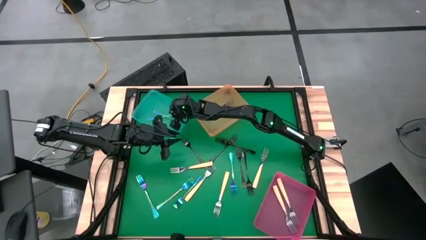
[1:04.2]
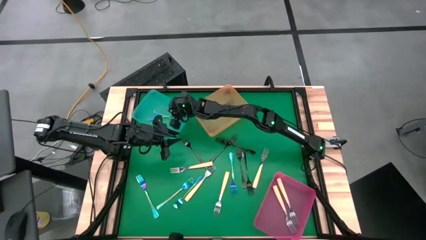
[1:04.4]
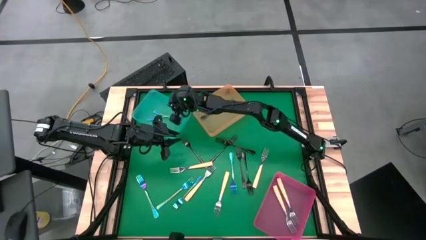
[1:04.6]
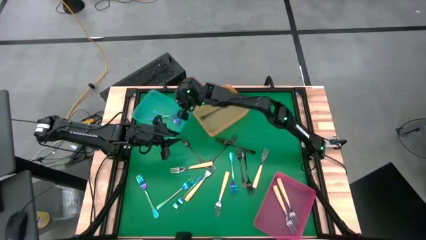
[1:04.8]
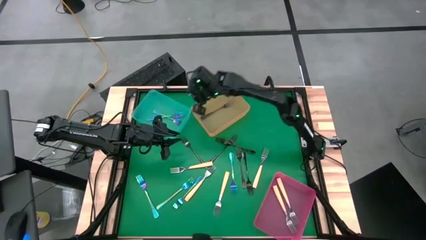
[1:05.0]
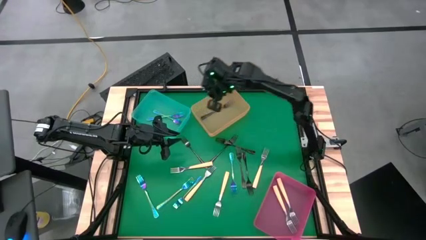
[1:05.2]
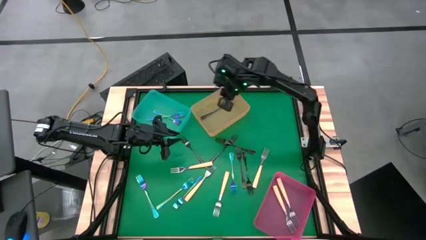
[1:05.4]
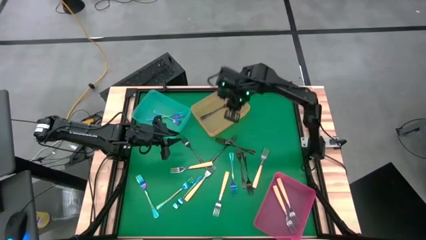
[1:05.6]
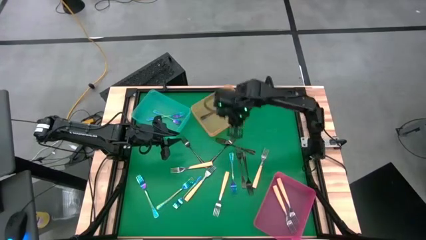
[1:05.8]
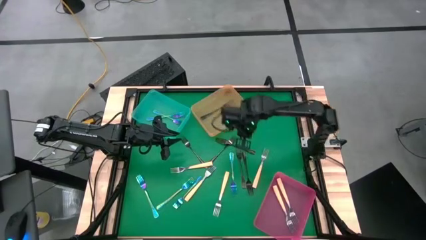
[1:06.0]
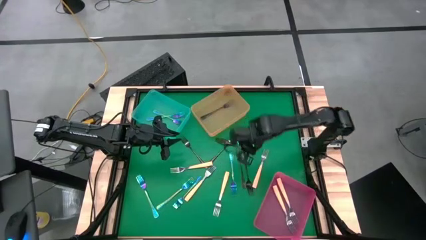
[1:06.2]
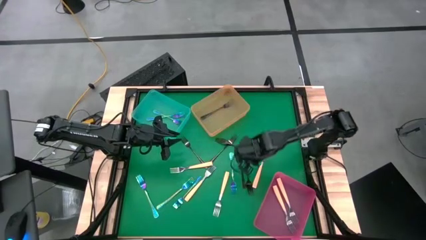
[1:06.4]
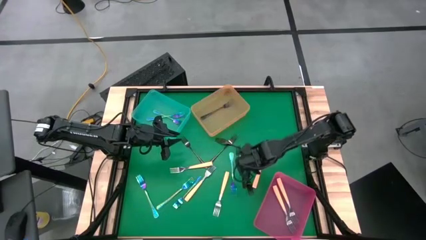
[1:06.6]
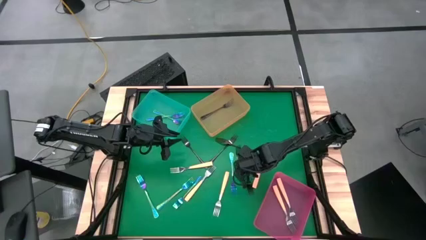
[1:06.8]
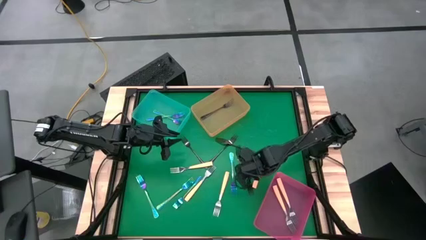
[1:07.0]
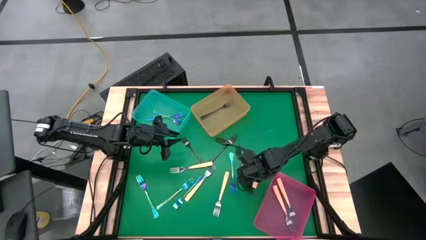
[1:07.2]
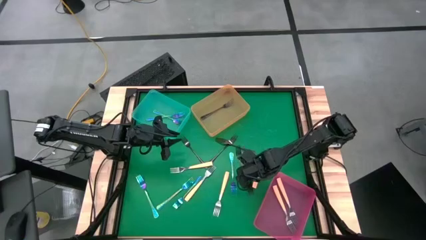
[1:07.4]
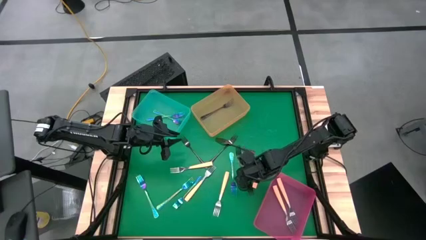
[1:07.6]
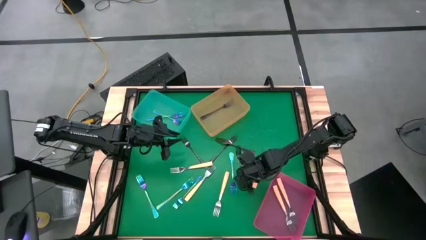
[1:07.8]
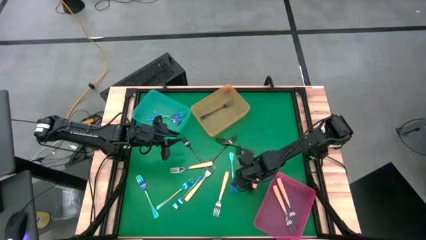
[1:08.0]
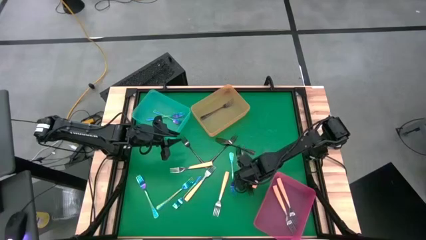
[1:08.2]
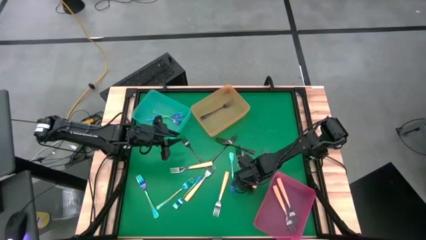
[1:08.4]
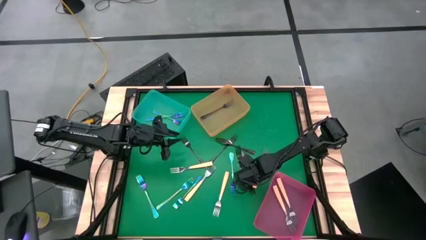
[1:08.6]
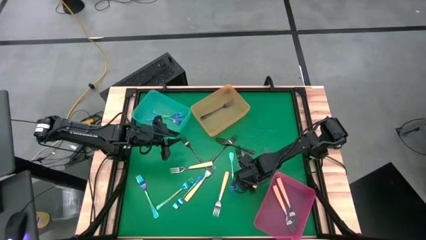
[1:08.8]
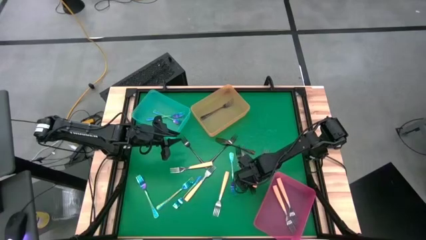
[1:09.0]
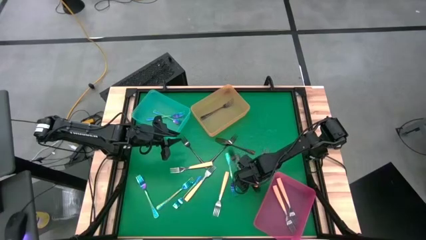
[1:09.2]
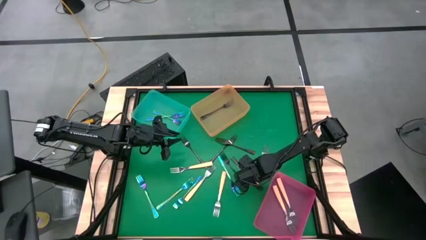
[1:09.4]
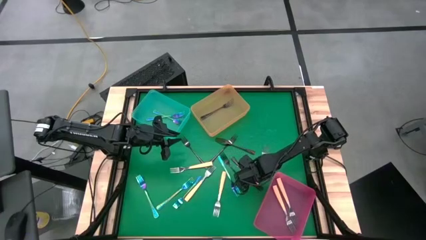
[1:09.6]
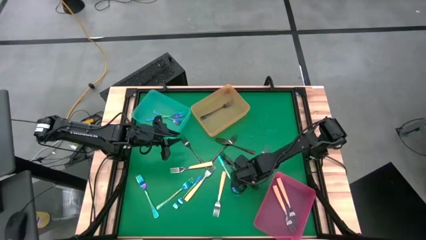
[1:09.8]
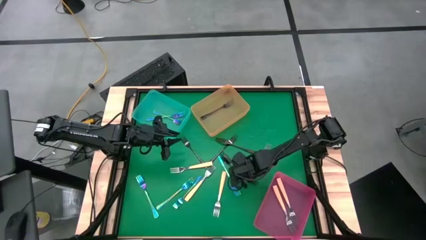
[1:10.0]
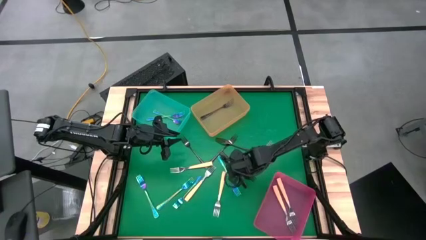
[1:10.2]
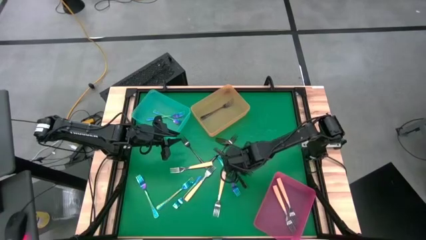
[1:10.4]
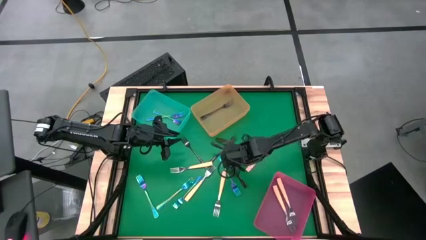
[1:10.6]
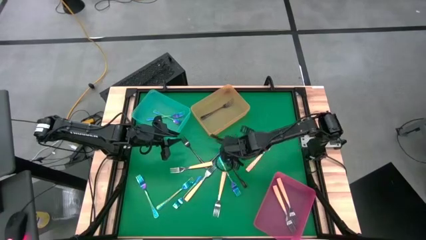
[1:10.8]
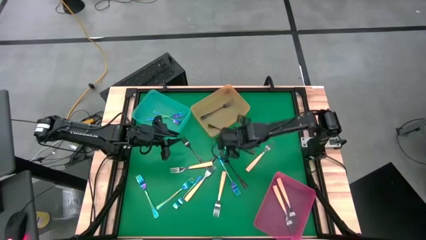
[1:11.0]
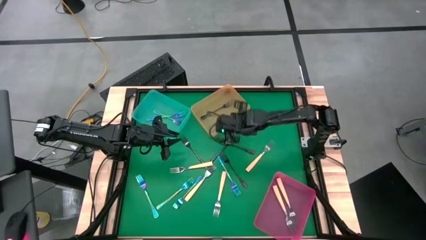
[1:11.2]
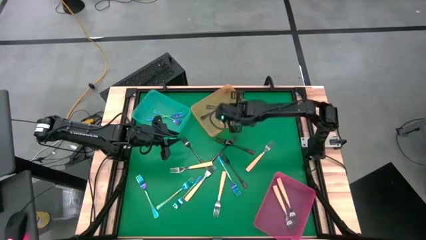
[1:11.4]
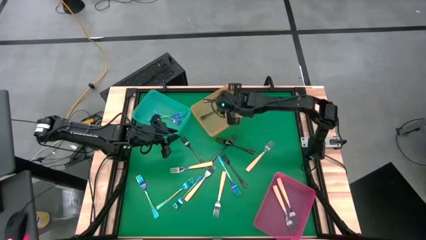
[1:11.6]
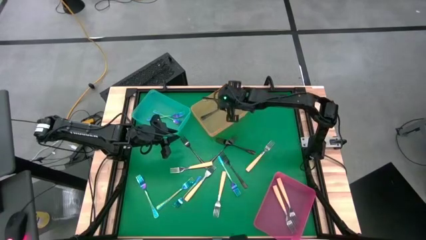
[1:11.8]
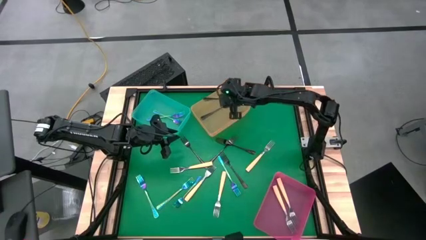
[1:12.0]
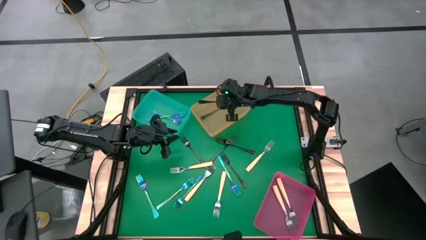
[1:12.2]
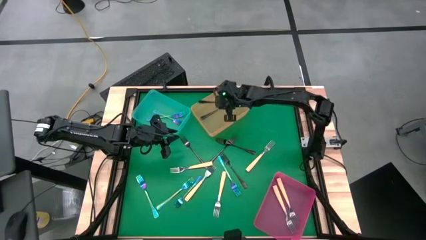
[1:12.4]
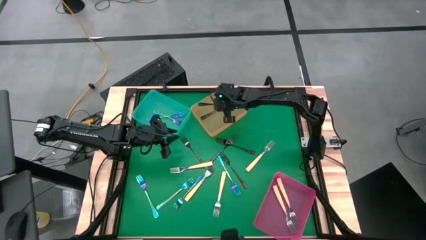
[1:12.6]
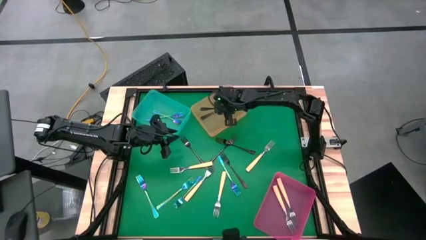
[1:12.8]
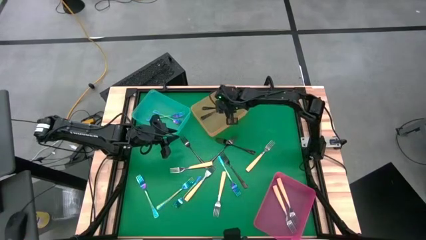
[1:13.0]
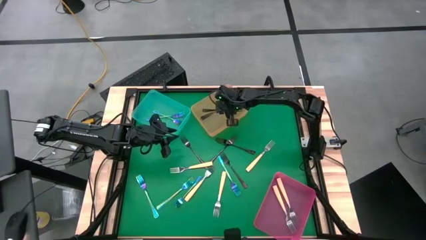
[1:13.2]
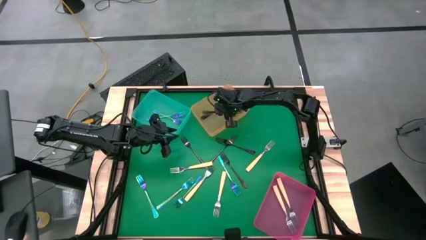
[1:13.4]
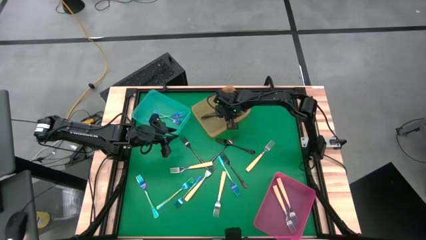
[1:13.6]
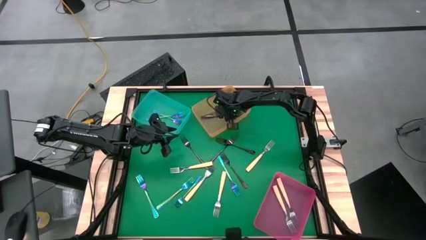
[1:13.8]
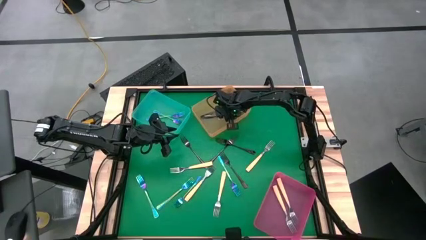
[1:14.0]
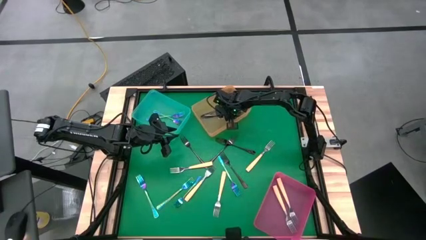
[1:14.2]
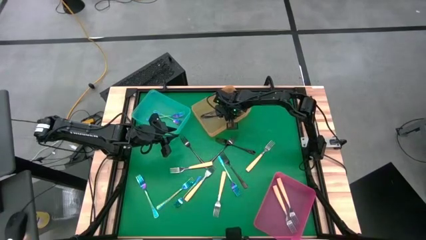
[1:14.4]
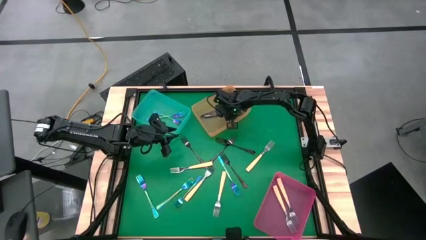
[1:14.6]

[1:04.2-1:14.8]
Task: Sort silverware by color (type)
Put the black fork into the yellow bin

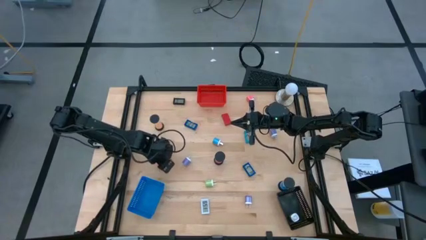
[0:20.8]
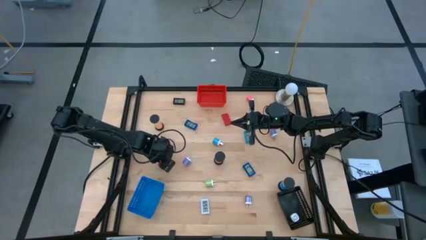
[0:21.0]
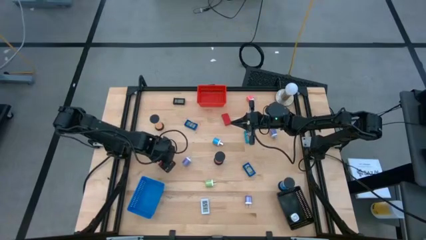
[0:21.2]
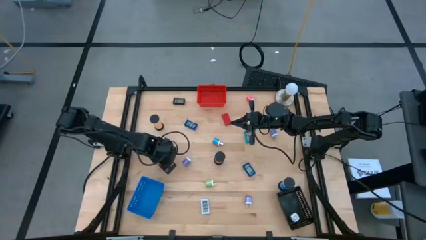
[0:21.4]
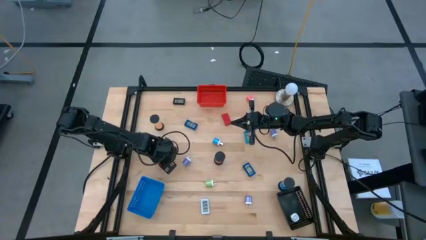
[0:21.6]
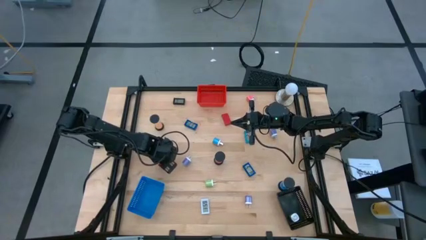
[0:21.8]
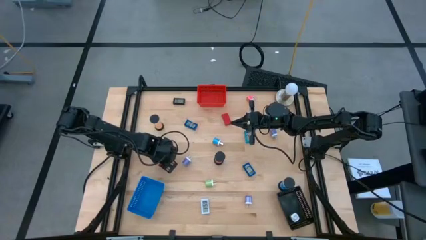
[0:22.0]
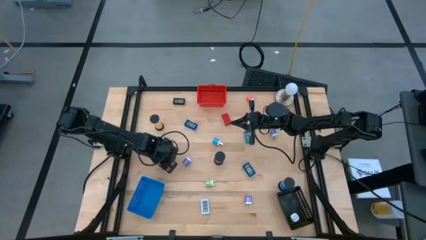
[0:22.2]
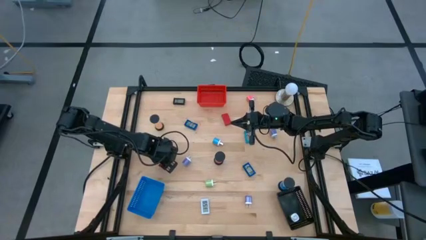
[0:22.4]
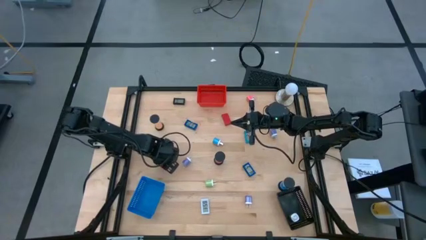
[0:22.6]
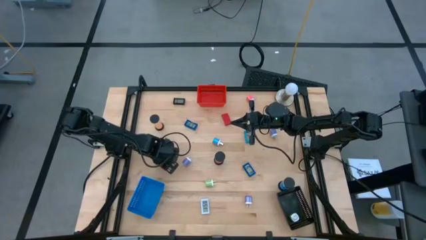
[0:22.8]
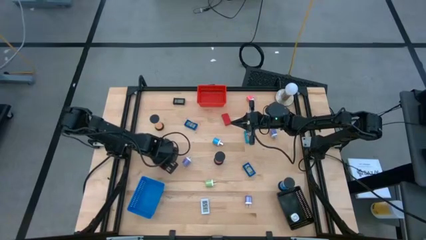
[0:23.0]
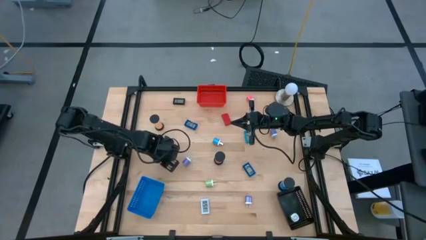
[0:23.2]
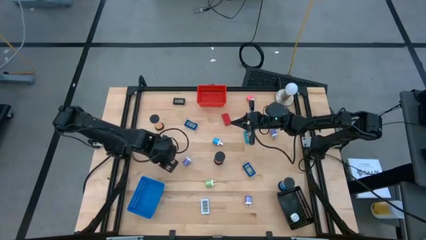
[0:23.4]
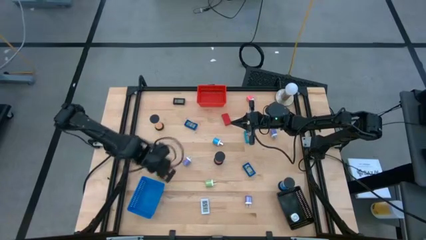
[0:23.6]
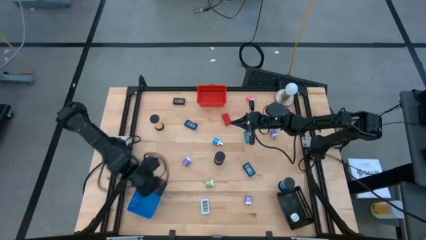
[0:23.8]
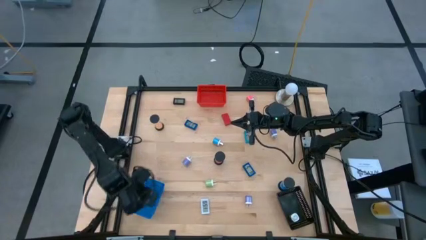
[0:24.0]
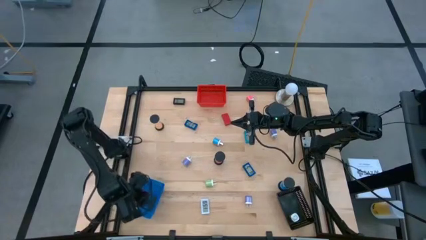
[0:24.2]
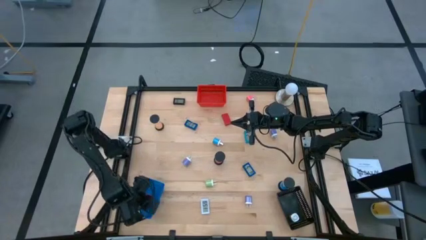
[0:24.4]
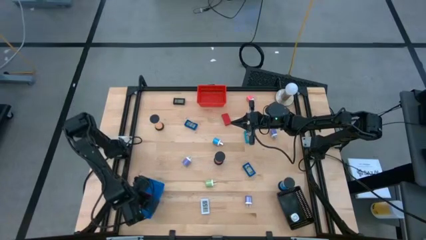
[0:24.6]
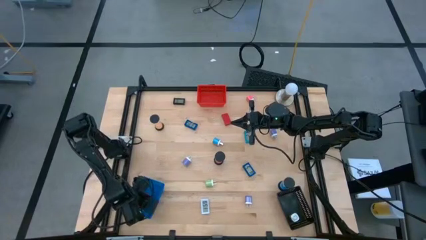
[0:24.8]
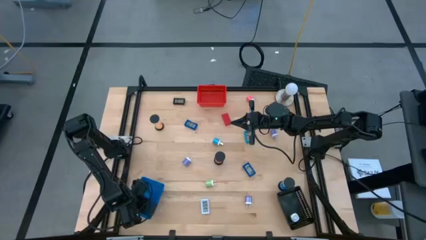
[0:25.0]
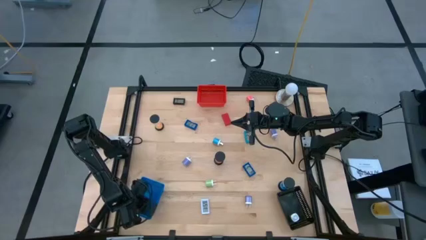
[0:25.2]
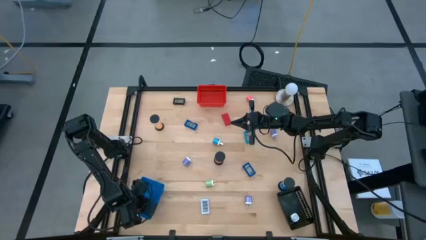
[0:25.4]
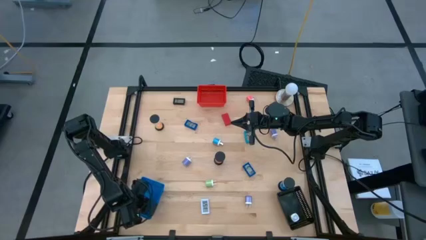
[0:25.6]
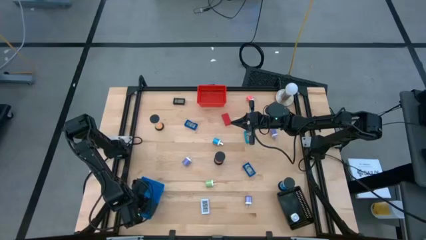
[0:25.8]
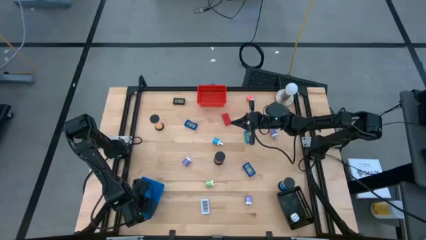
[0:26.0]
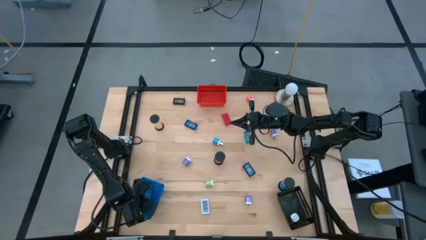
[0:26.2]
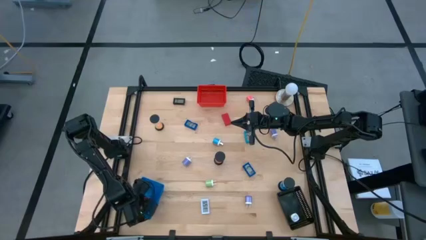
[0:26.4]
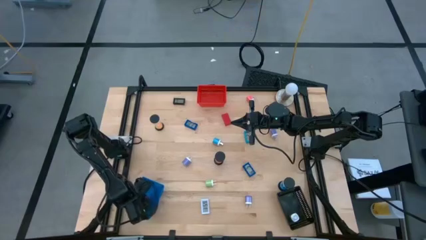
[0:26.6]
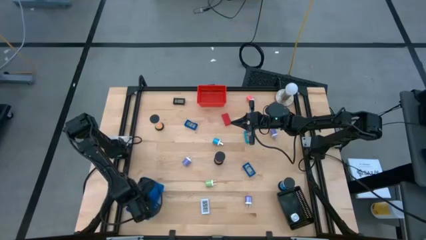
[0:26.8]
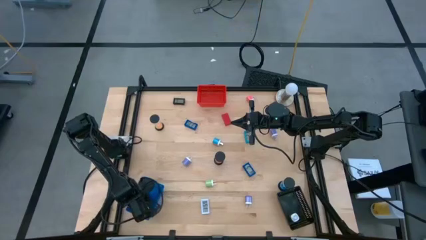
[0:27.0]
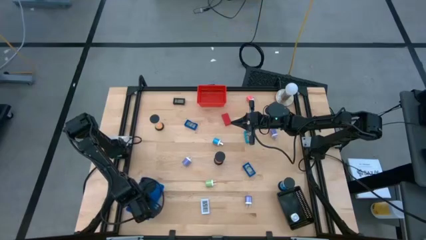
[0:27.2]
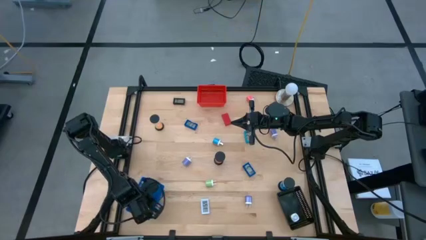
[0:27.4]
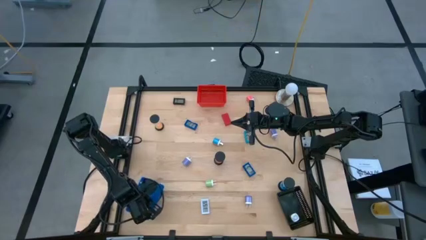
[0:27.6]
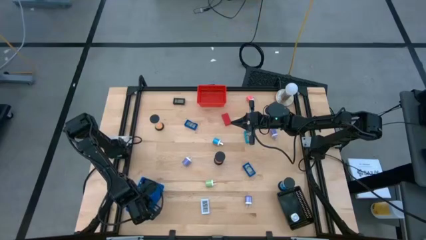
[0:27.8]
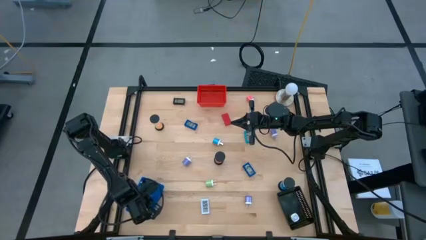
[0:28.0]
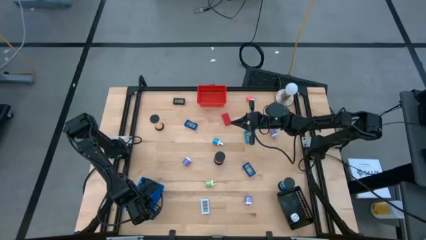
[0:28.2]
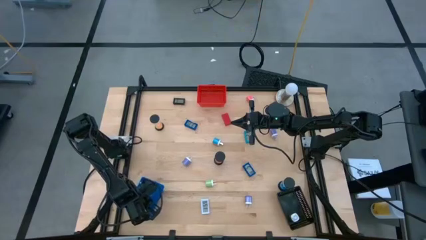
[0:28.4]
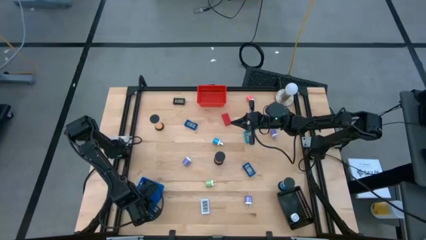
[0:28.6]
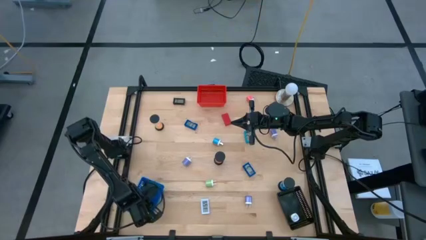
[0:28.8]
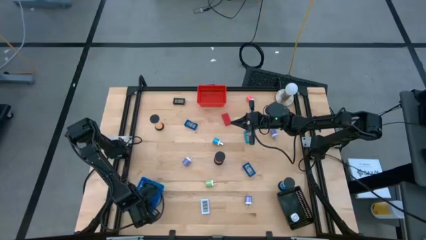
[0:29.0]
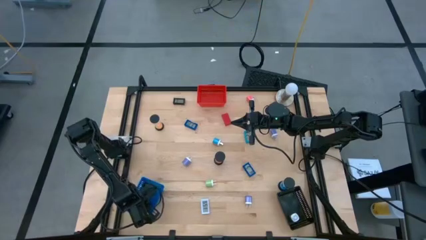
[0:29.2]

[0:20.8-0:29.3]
Task: Pick & Place Office items
Put the bottom red digital timer into the blue bin
